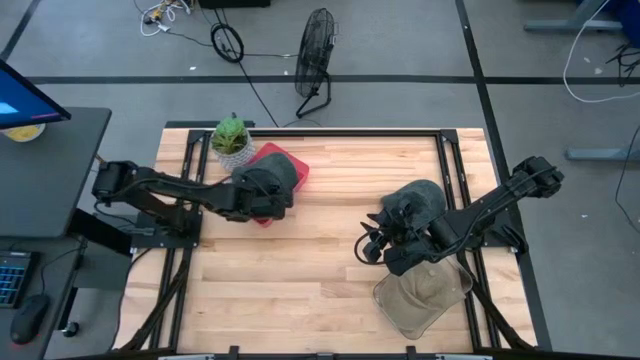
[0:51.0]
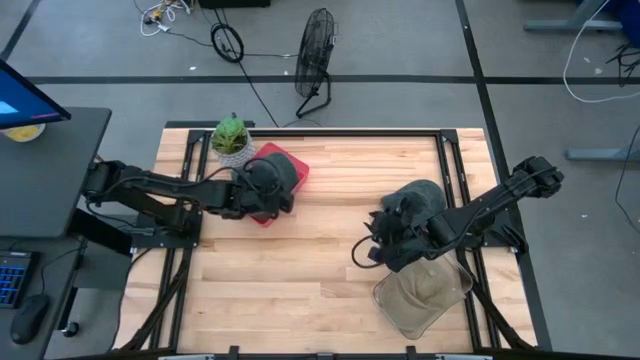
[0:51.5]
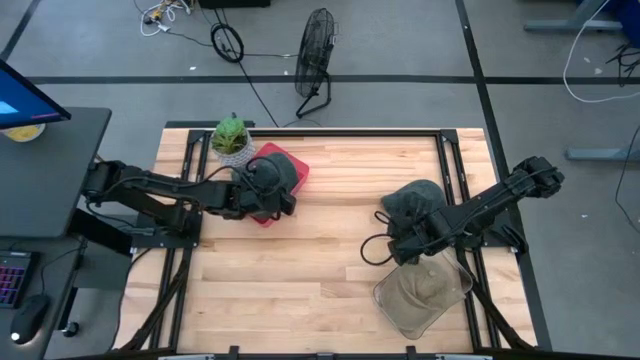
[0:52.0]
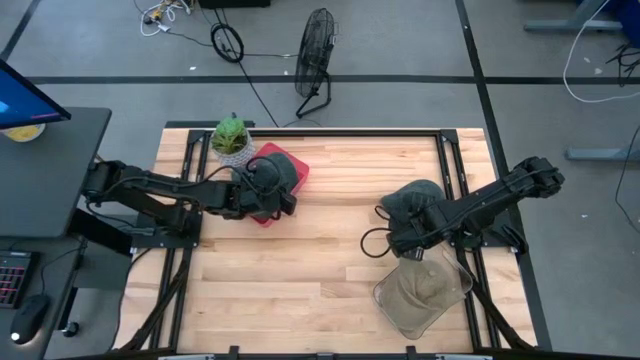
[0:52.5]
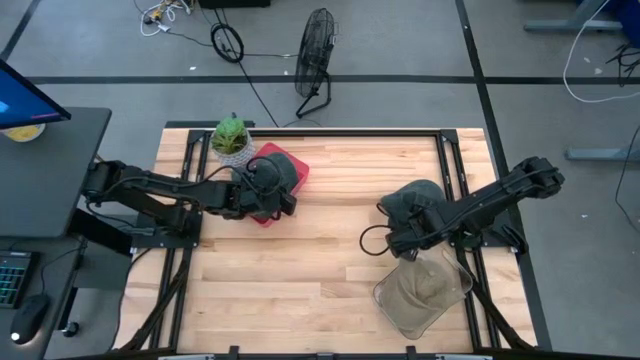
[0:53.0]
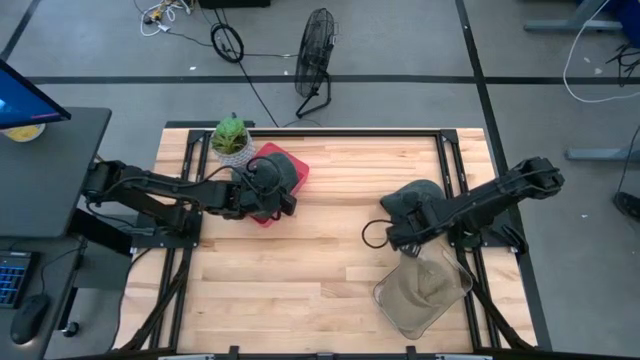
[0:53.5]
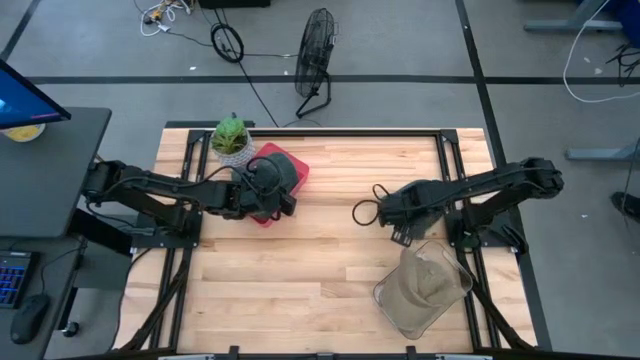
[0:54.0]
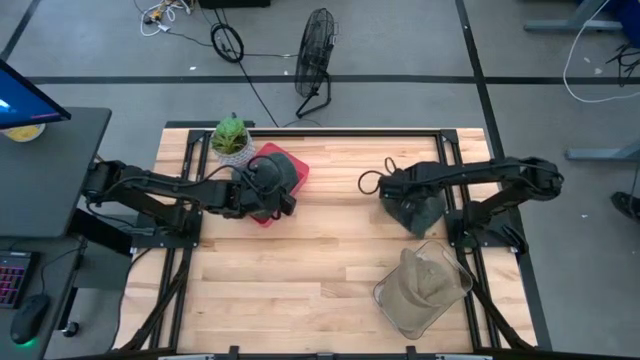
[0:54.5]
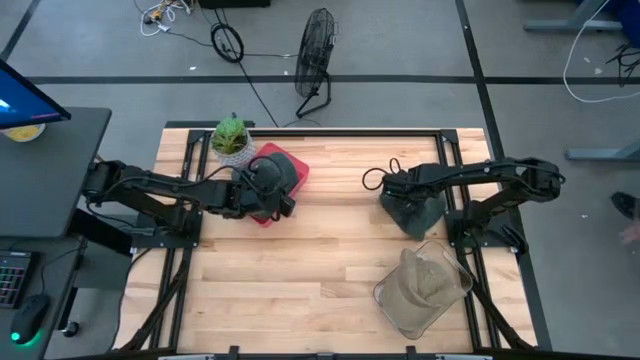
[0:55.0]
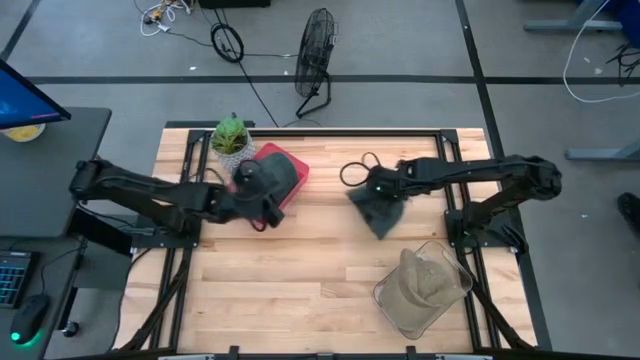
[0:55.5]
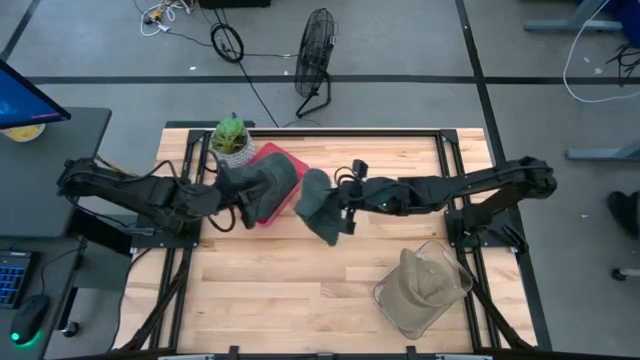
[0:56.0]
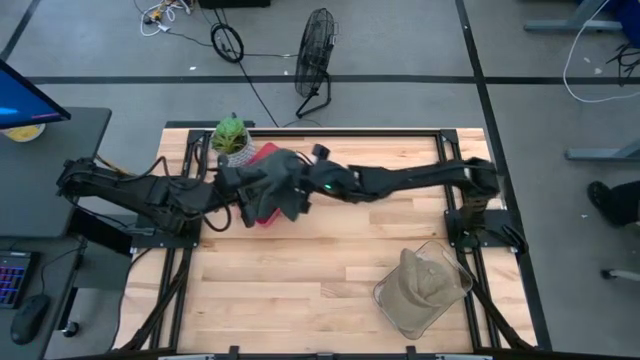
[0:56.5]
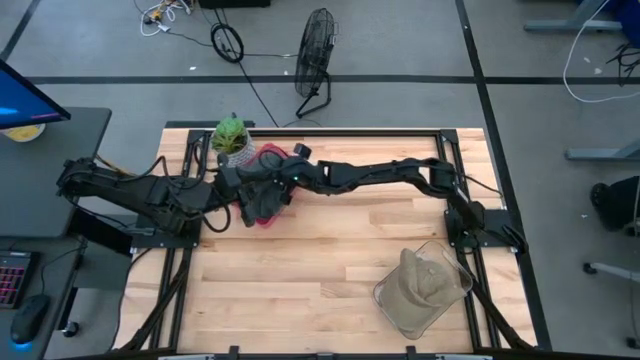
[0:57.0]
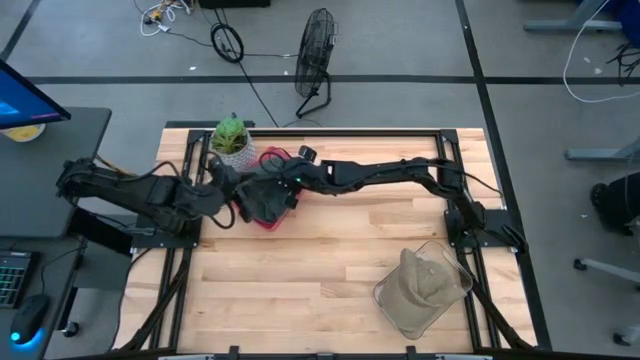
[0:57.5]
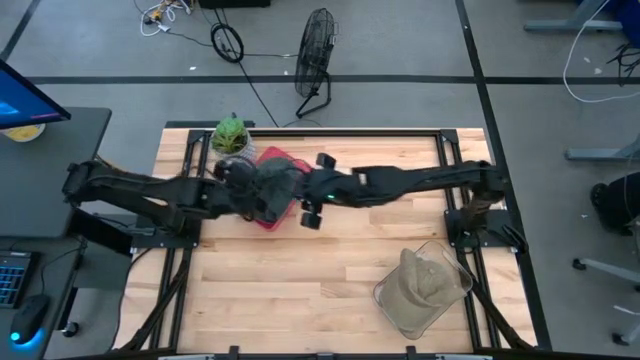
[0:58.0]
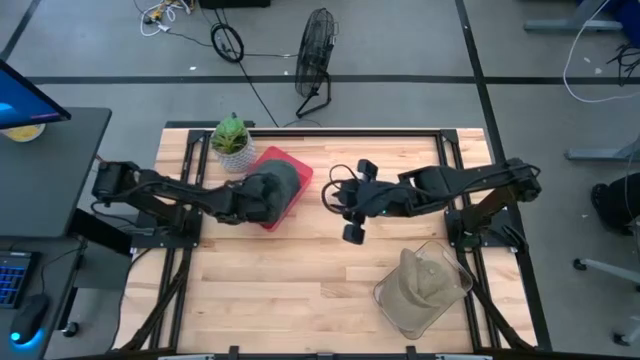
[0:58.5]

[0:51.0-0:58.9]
Task: Pick & Place hat
Put the black cap into the red bin

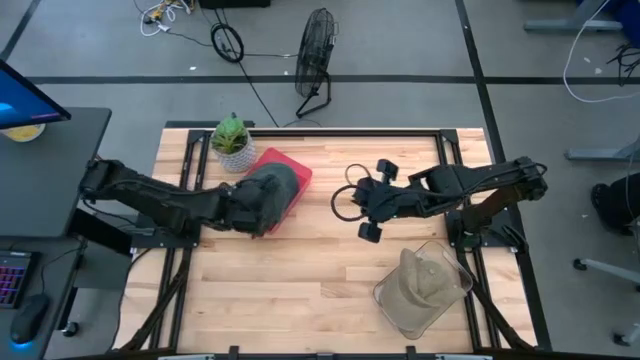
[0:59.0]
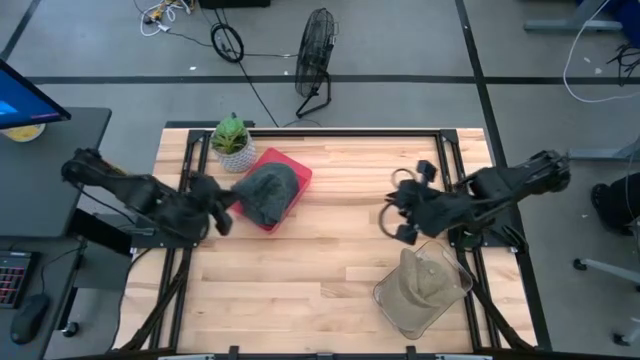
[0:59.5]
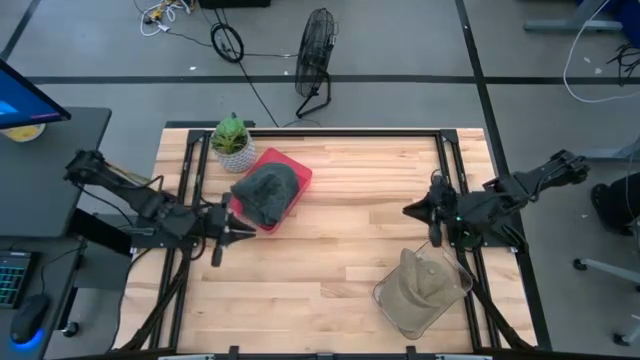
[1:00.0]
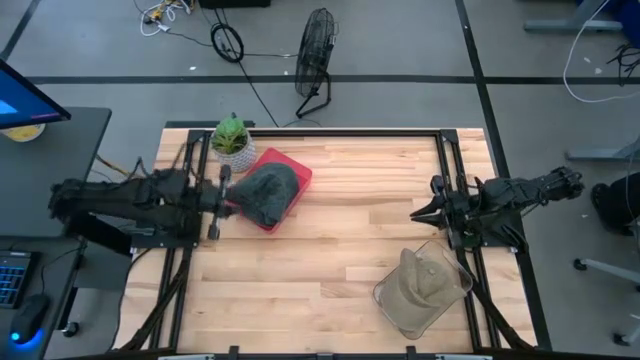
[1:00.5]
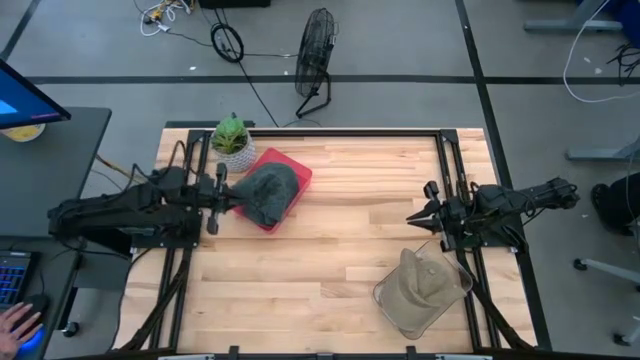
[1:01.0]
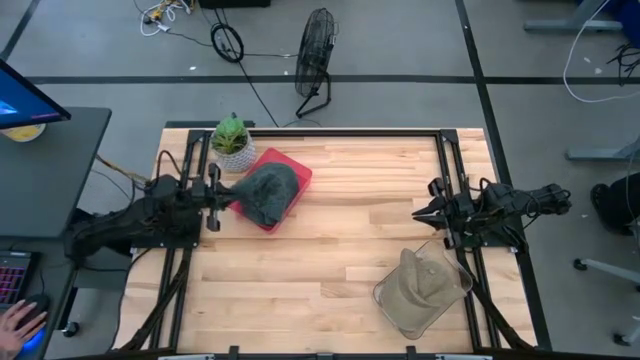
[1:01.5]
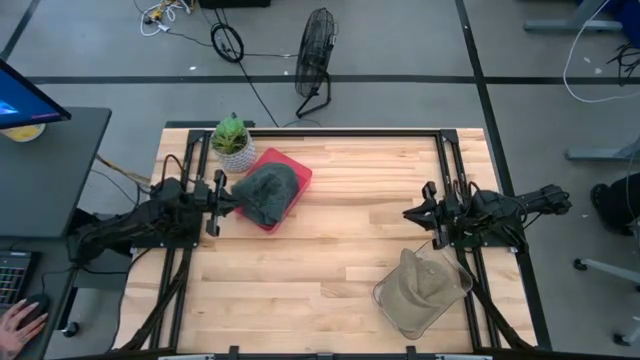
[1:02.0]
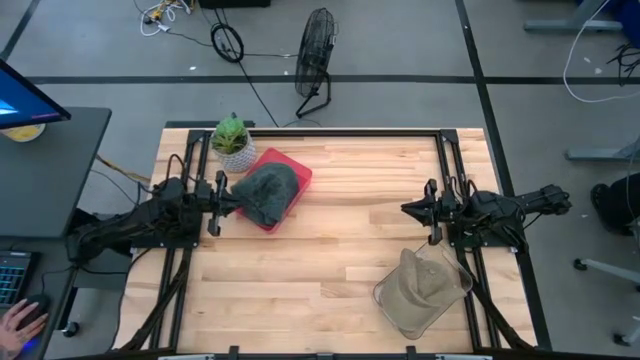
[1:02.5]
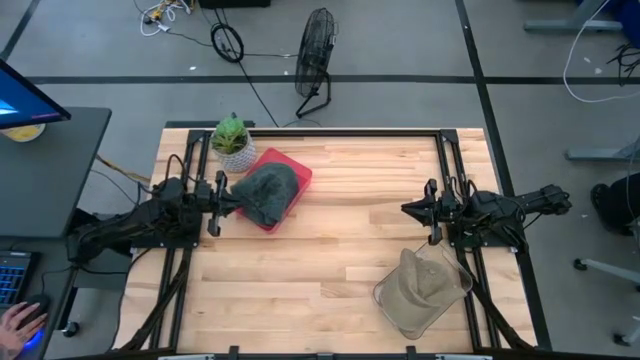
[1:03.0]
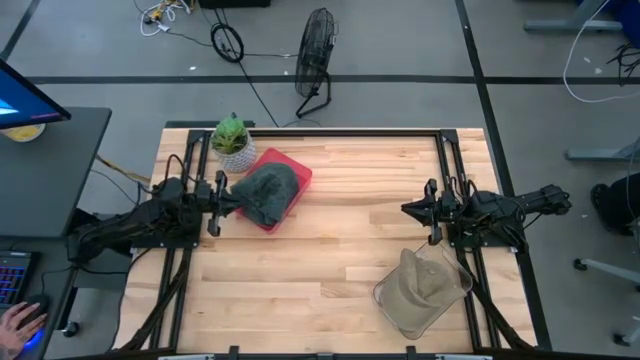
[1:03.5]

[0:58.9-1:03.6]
Return to Home Position

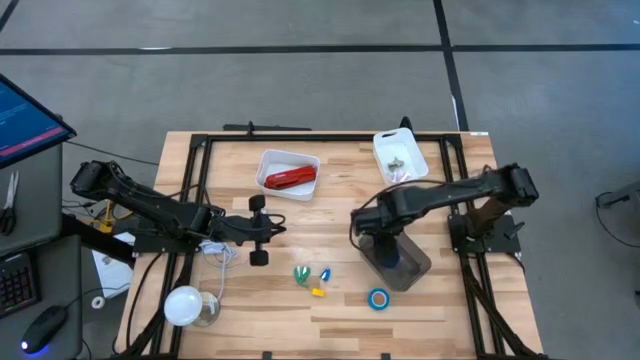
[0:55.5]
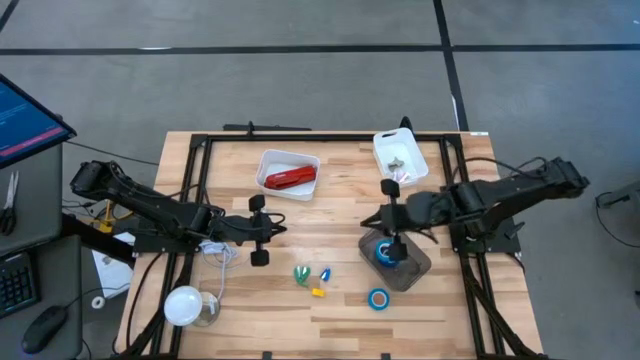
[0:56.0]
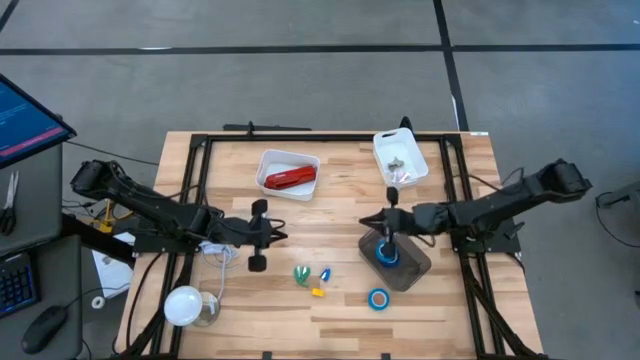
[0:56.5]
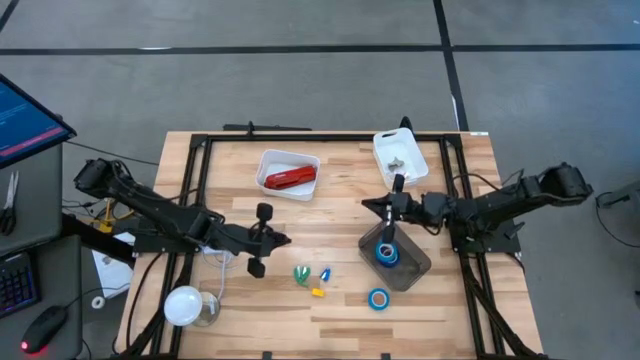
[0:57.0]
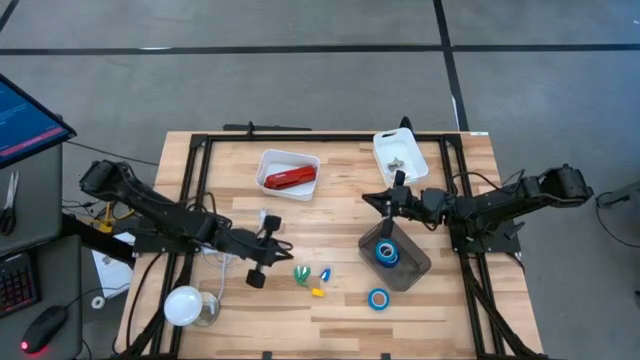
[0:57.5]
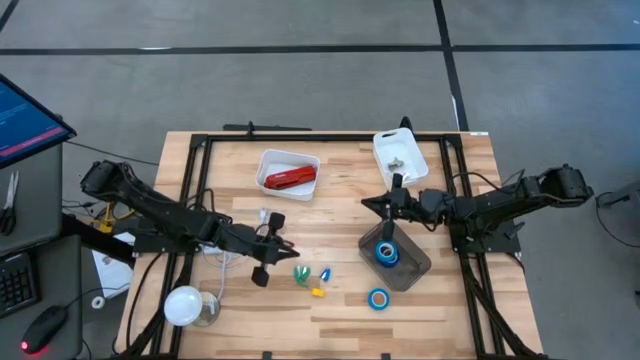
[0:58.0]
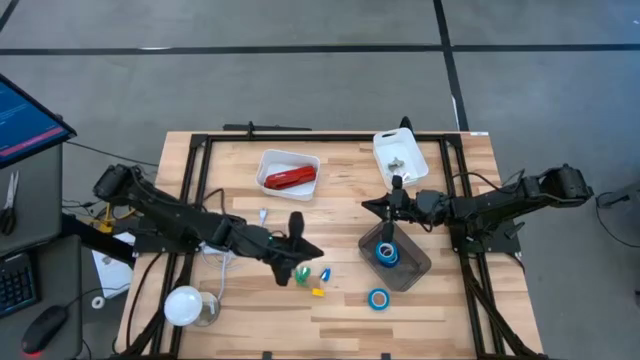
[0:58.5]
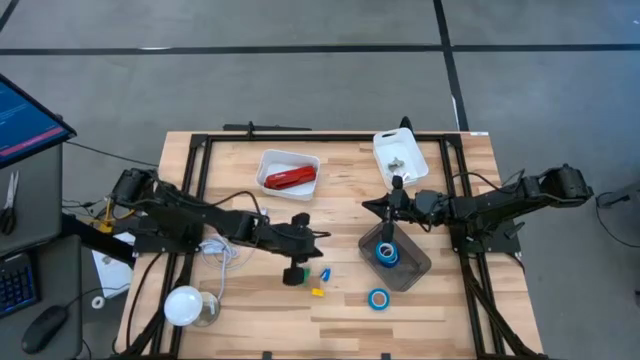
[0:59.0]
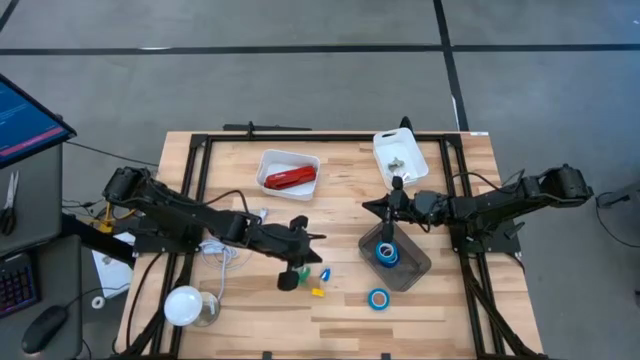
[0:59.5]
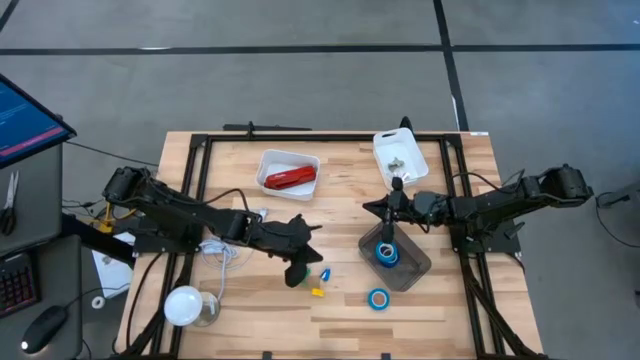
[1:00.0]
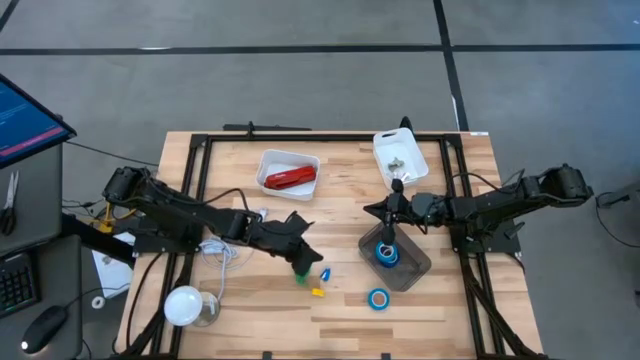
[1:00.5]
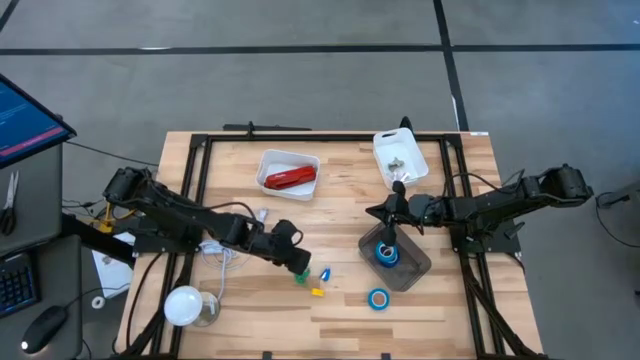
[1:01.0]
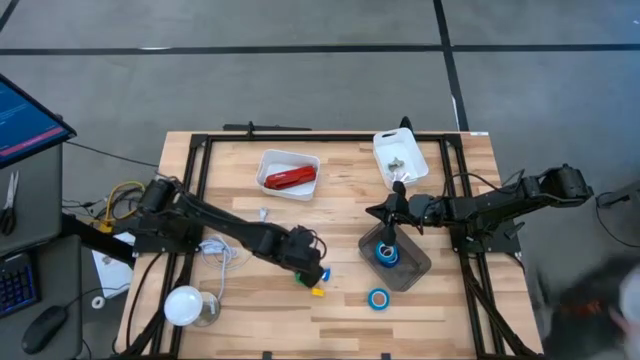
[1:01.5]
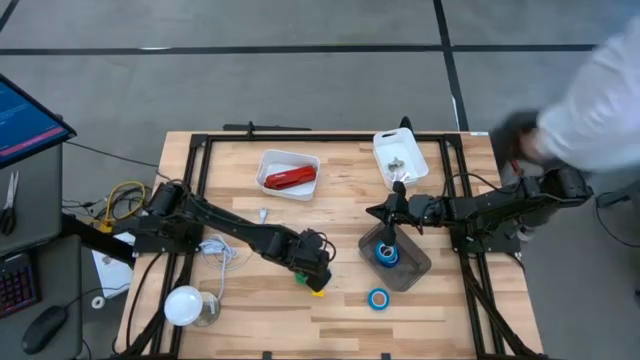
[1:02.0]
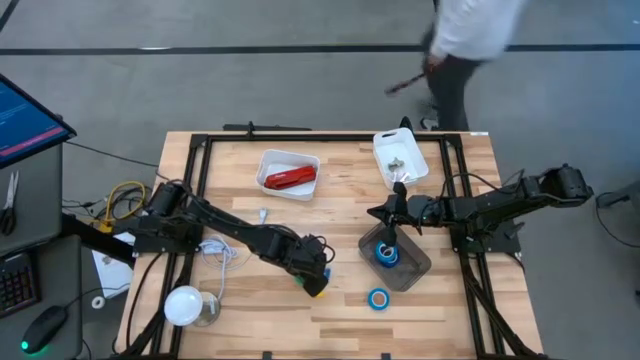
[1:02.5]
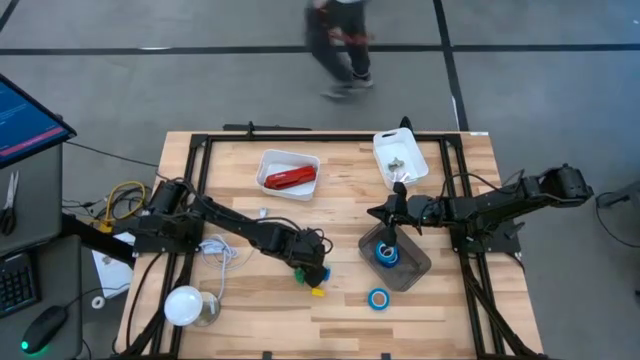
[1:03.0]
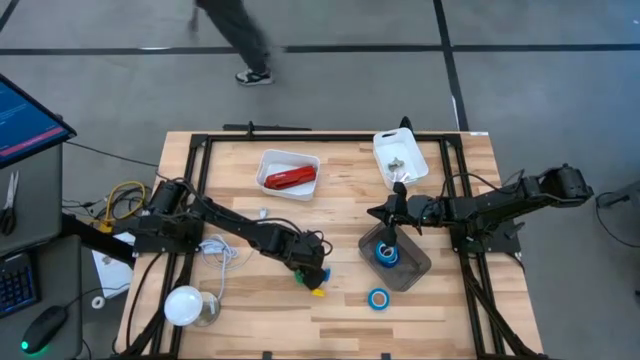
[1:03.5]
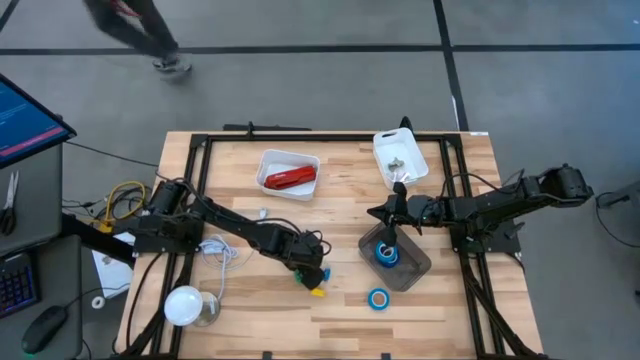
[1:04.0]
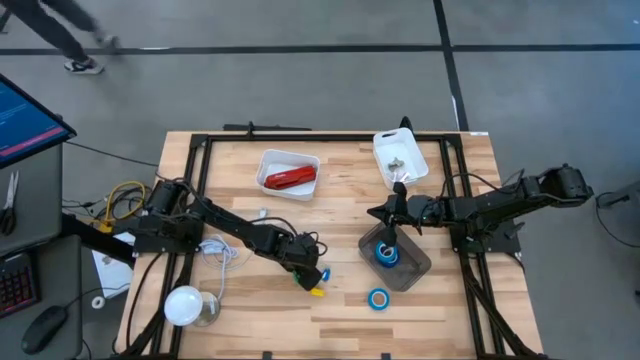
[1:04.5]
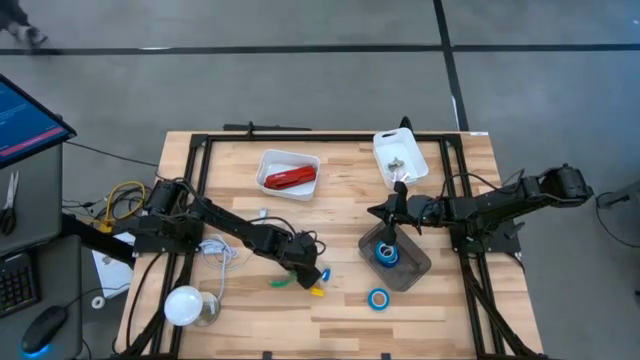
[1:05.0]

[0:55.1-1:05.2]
Task: Pick and place Stapler, Stapler remover, tape
Put the right green small stapler into the left white bin
